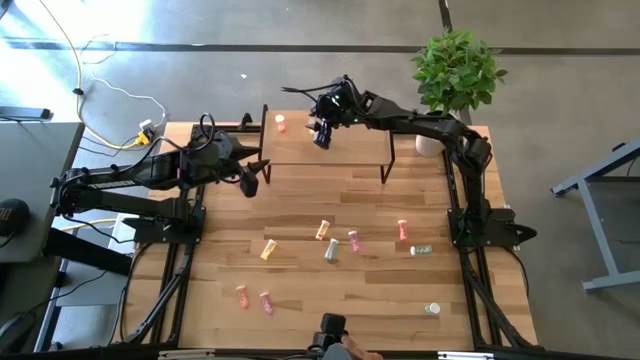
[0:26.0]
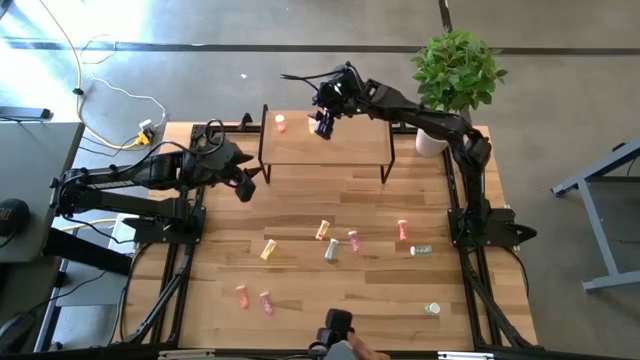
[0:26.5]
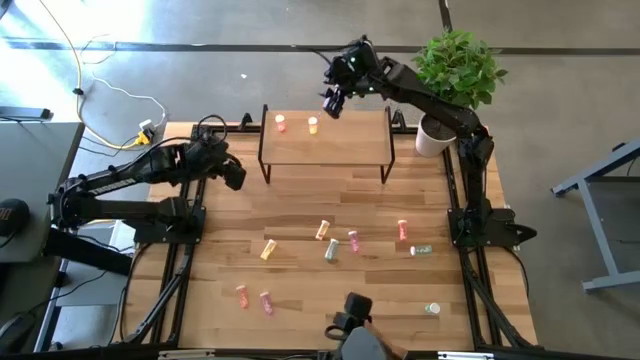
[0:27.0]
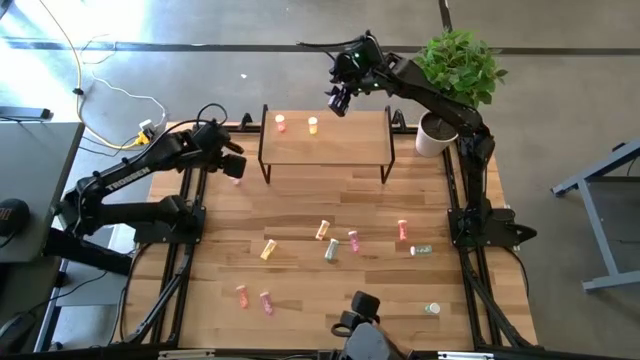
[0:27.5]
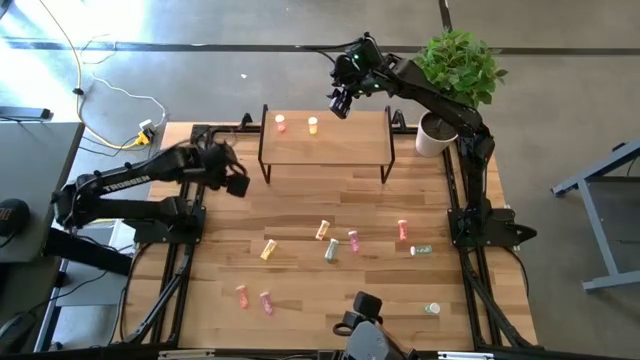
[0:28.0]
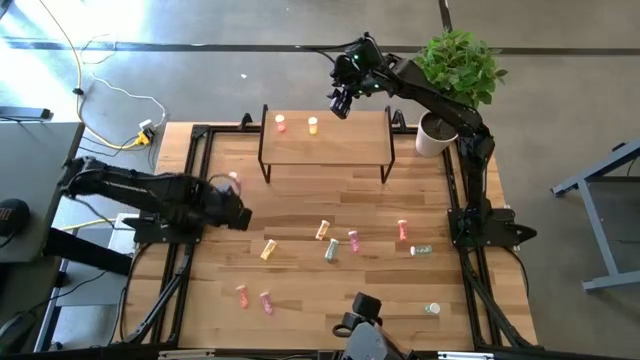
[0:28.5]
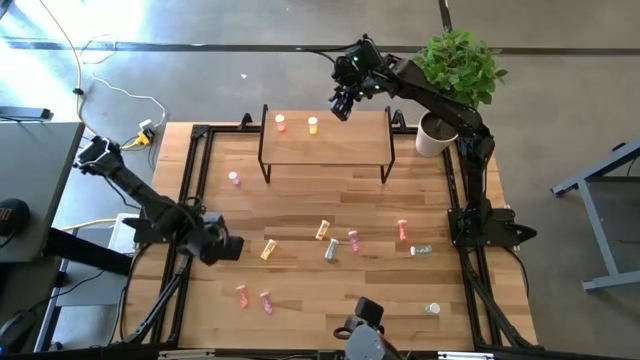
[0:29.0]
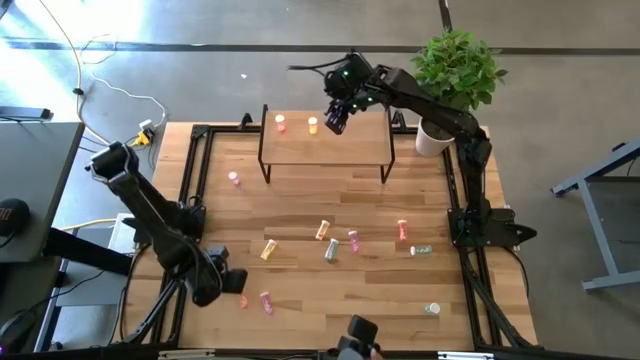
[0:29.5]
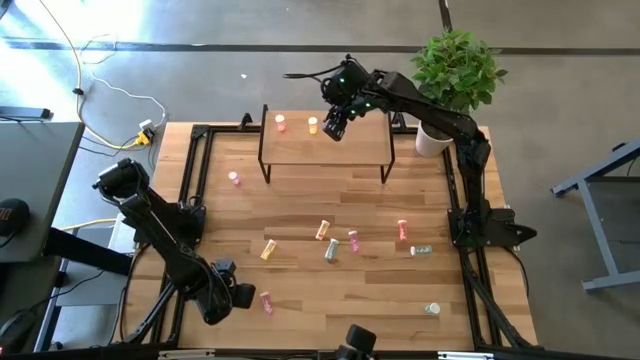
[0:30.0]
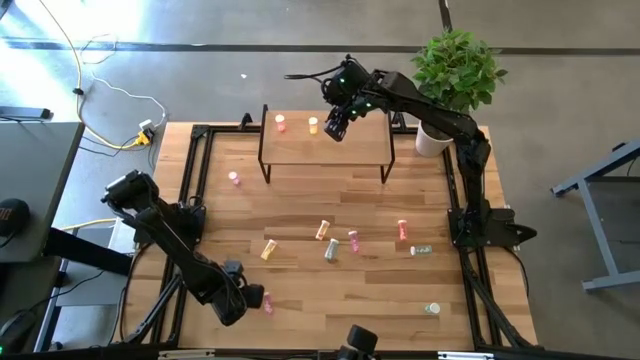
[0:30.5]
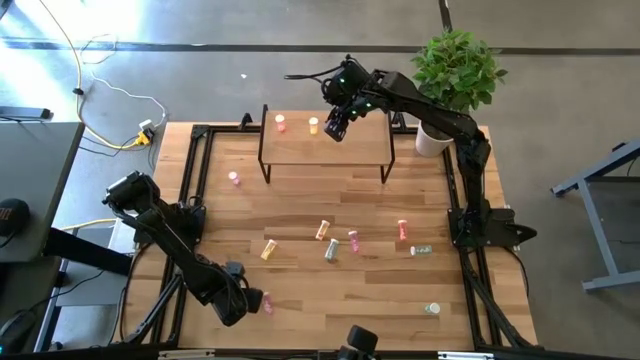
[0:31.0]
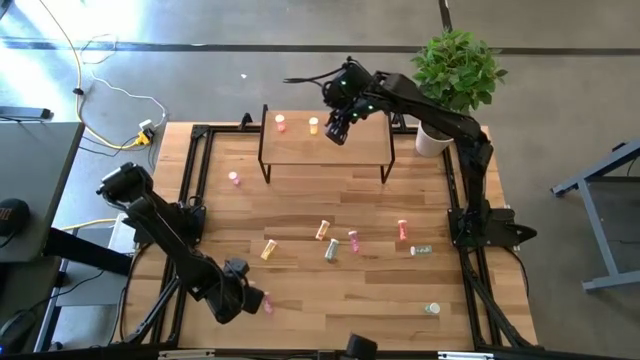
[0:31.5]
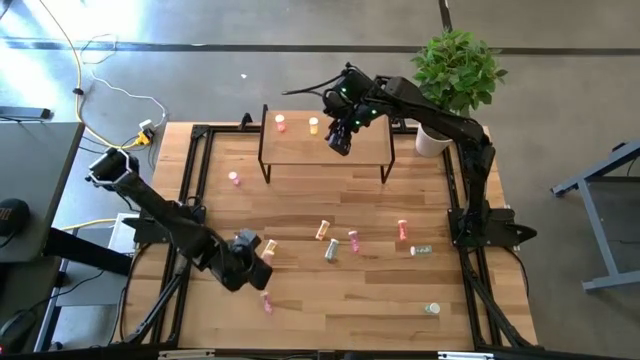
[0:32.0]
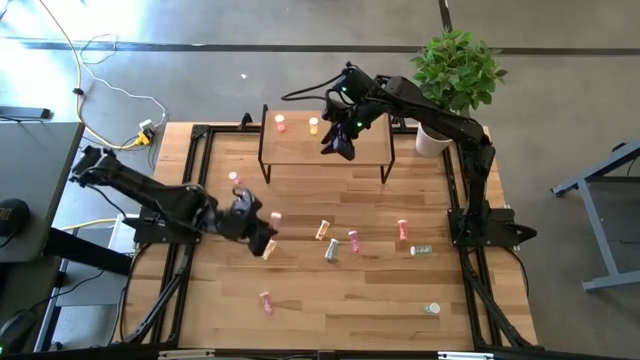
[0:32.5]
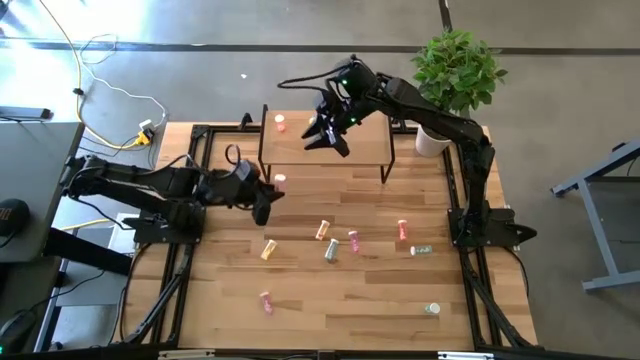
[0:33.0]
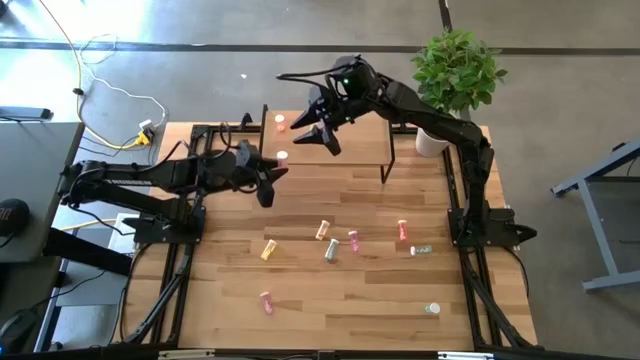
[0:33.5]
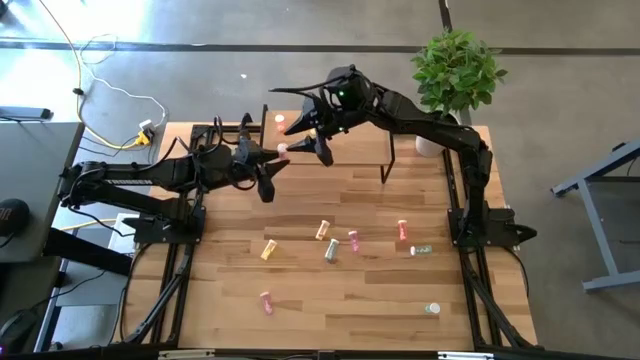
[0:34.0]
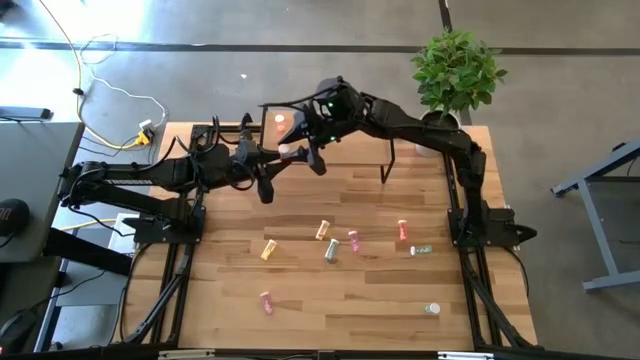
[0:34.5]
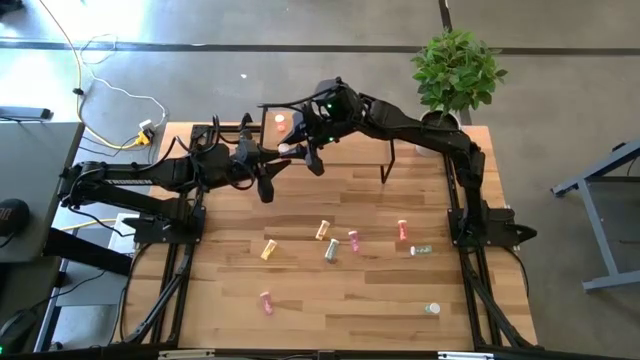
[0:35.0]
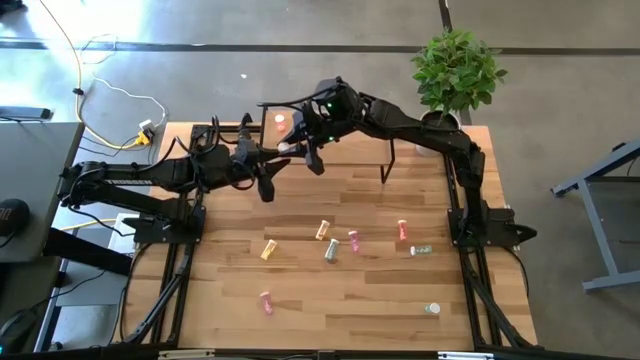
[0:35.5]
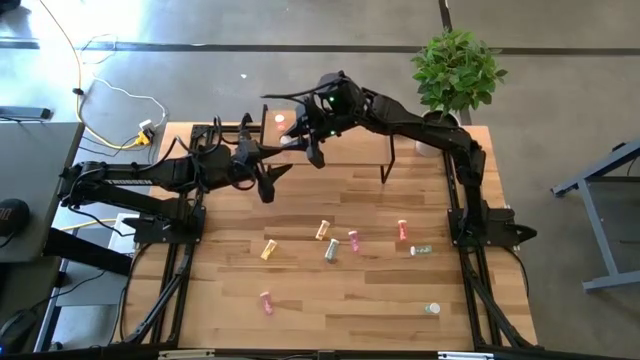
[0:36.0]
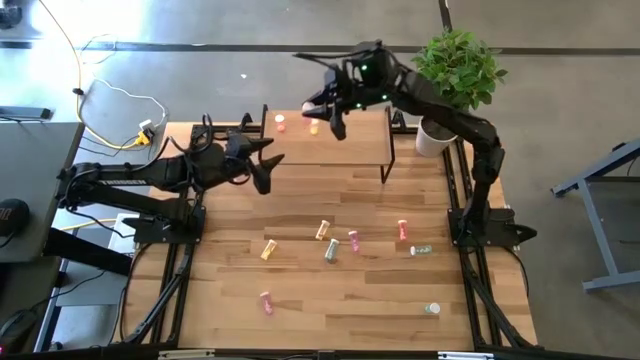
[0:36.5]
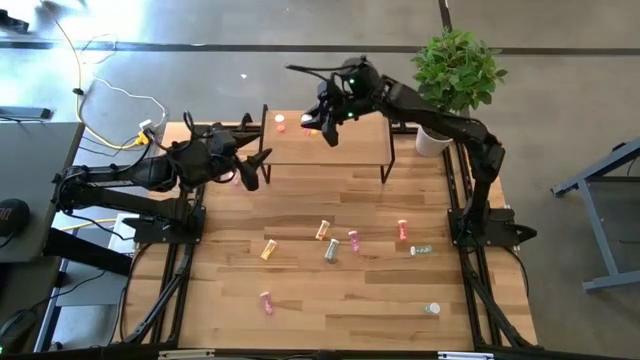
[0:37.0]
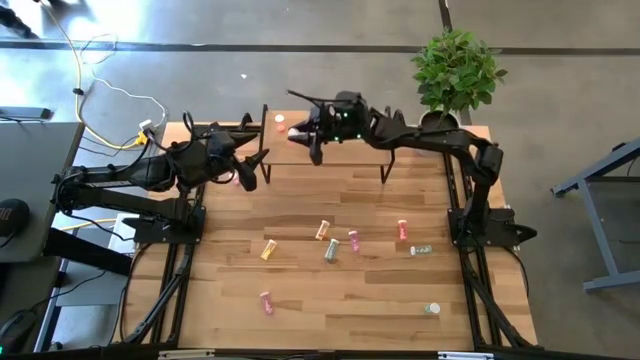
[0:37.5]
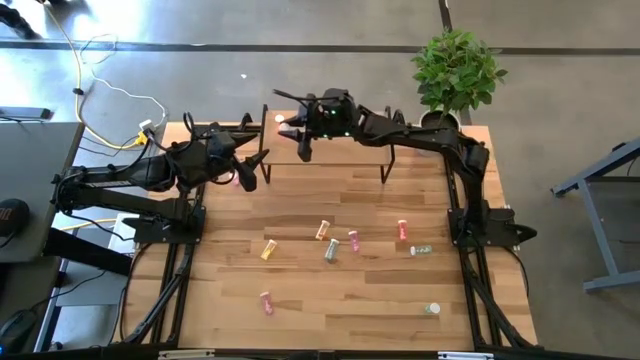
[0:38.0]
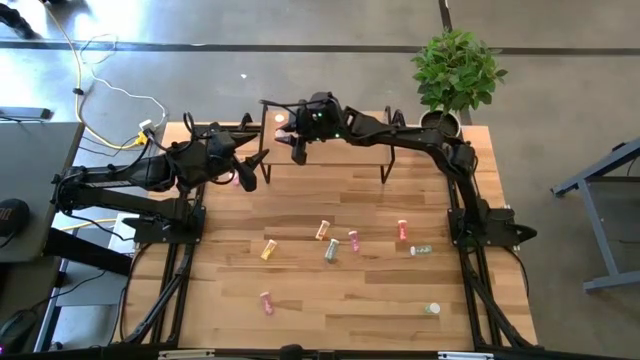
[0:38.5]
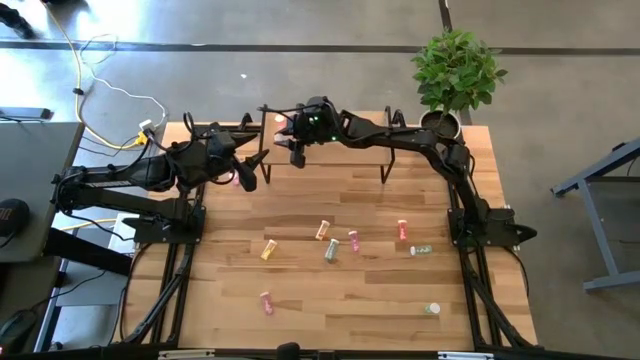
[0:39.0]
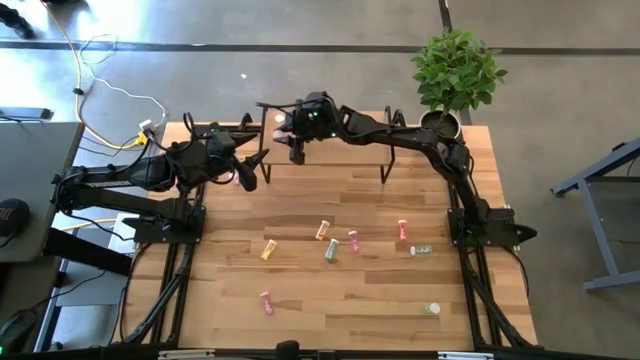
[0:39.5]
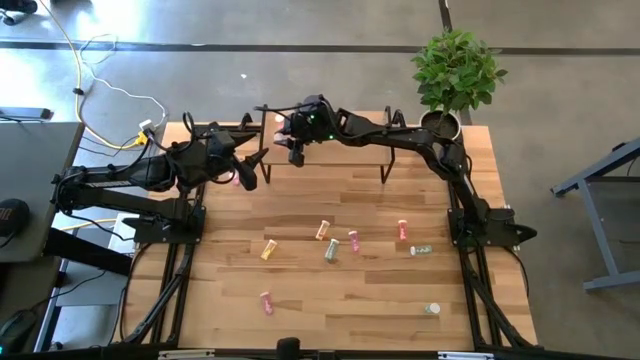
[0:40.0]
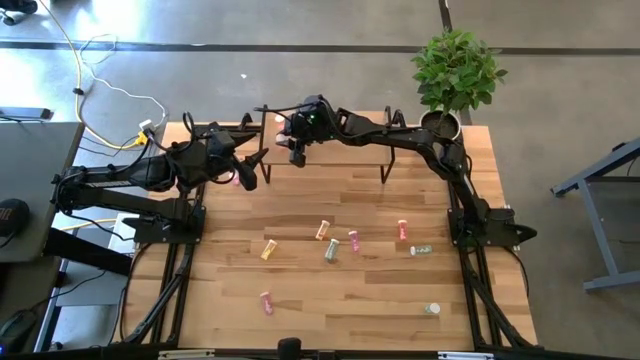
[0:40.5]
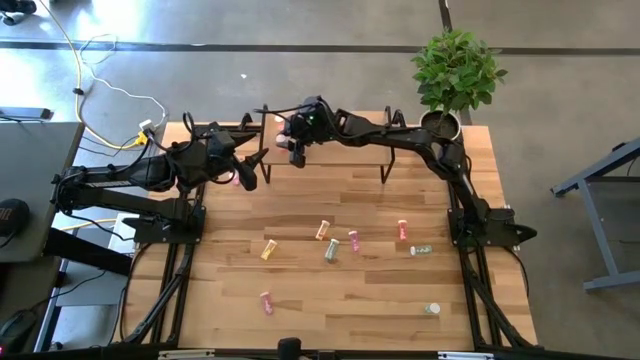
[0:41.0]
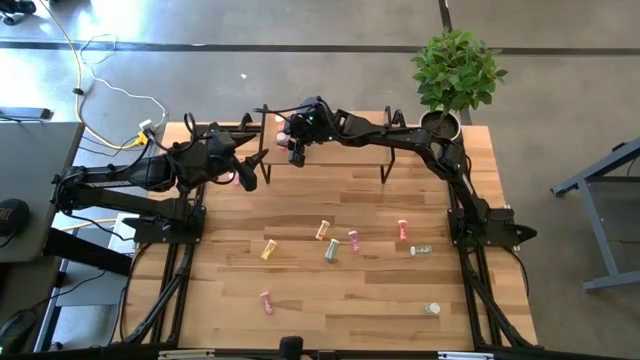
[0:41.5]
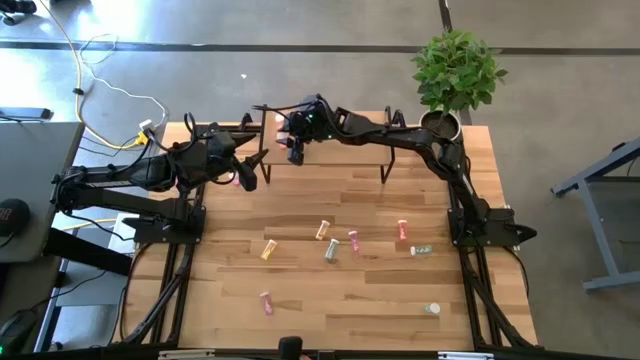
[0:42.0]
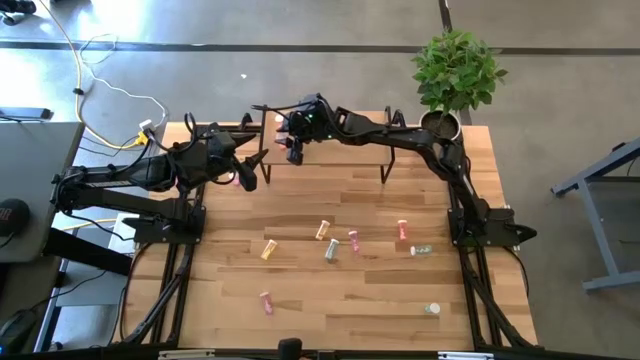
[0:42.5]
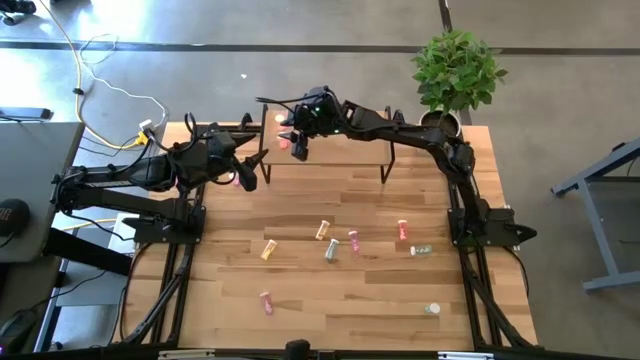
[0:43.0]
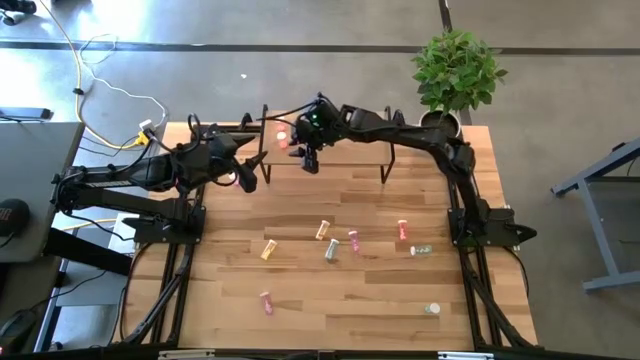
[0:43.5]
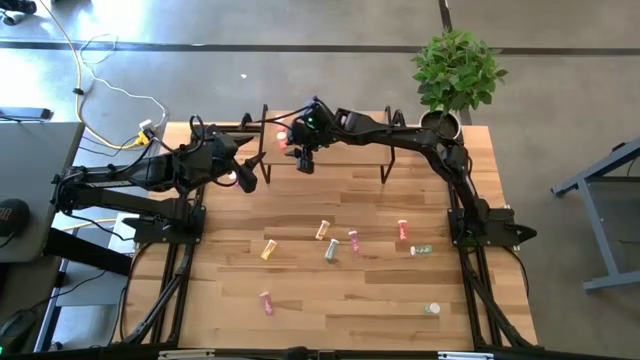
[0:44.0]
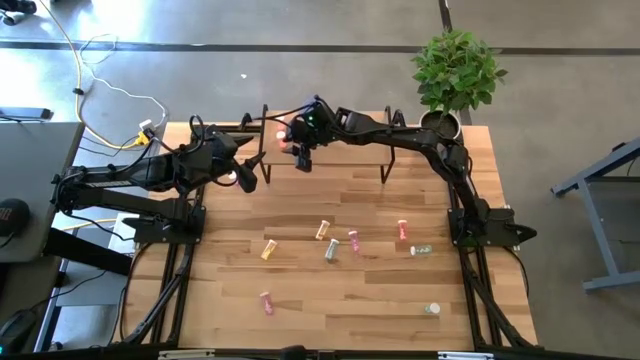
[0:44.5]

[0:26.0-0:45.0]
Task: Pick and place medicine bottles onto shelf by color
Put the bottom pink pill bottle on the shelf aligned with the pink pill bottle
